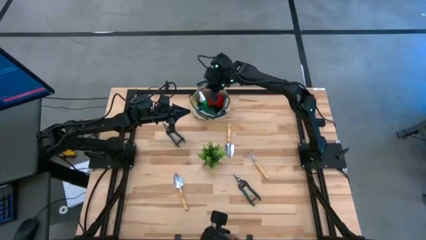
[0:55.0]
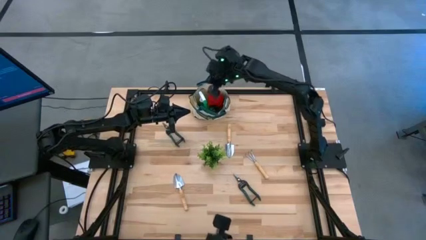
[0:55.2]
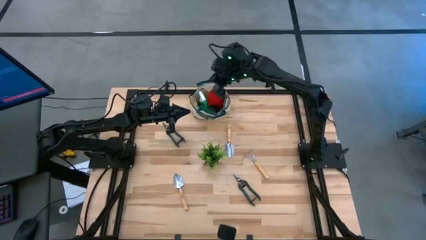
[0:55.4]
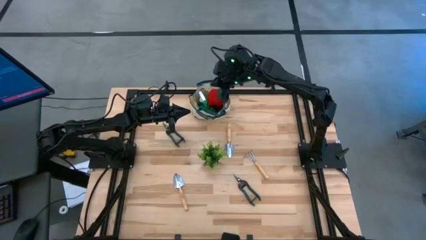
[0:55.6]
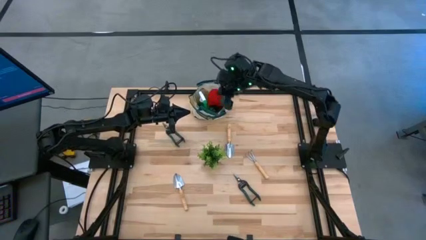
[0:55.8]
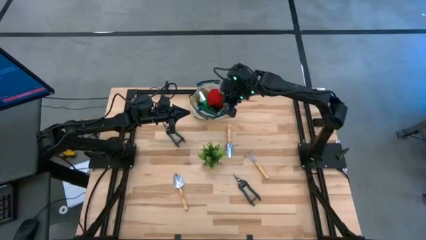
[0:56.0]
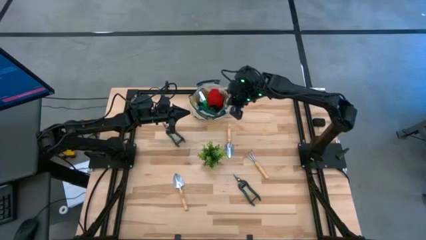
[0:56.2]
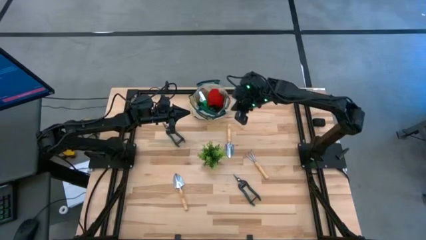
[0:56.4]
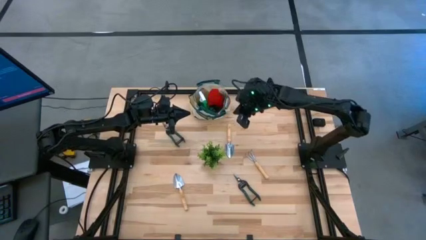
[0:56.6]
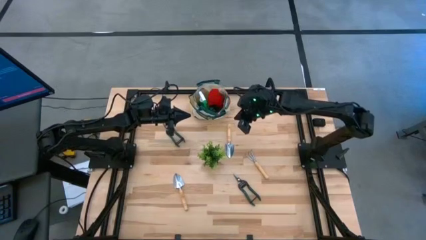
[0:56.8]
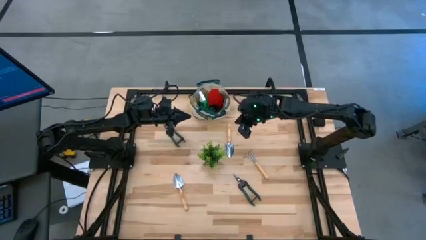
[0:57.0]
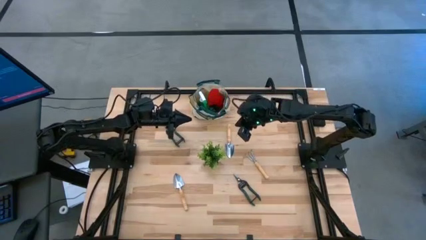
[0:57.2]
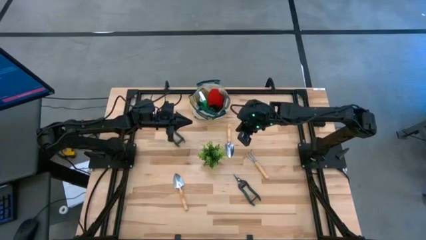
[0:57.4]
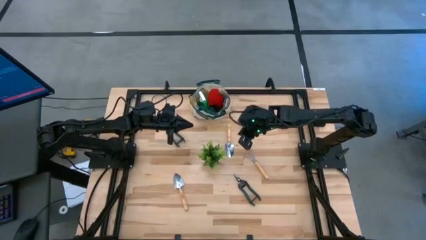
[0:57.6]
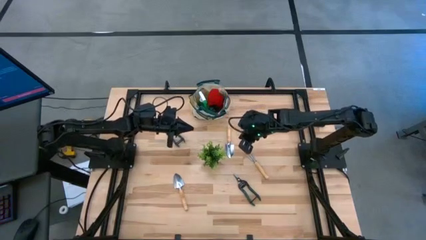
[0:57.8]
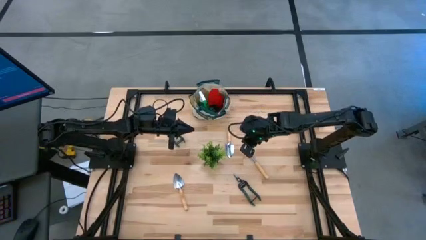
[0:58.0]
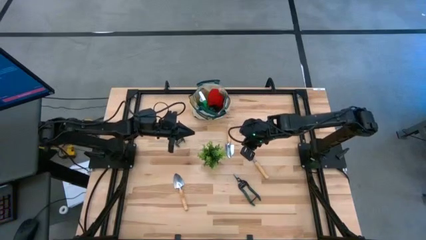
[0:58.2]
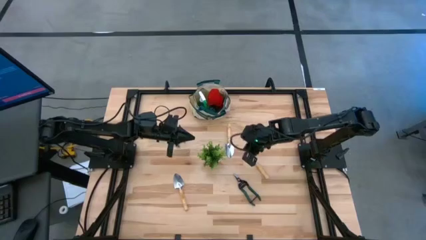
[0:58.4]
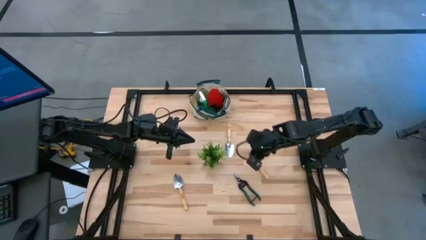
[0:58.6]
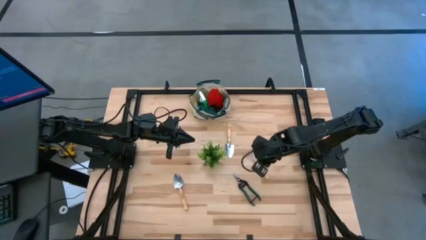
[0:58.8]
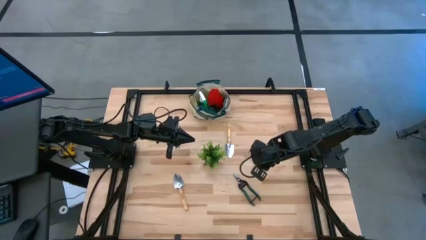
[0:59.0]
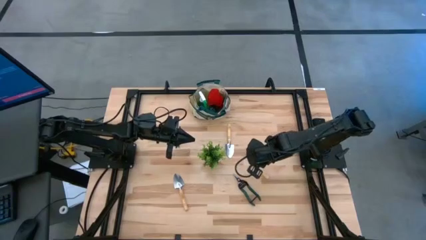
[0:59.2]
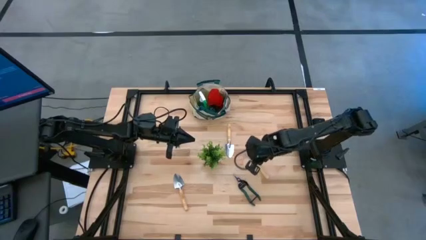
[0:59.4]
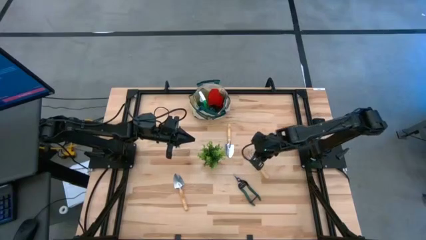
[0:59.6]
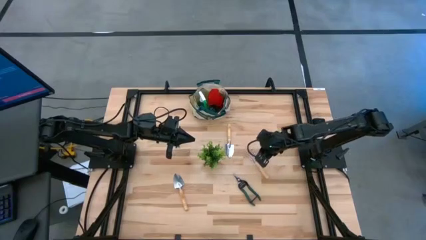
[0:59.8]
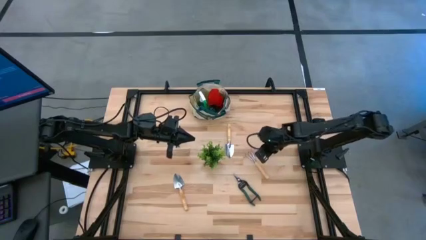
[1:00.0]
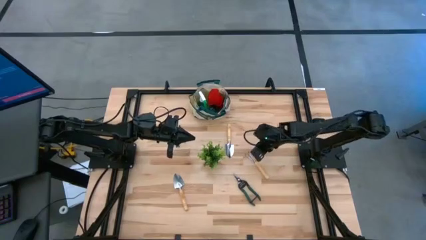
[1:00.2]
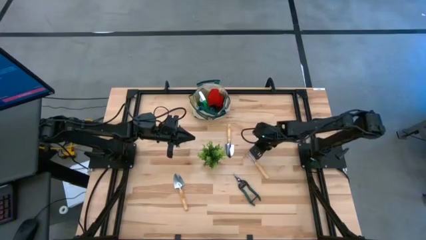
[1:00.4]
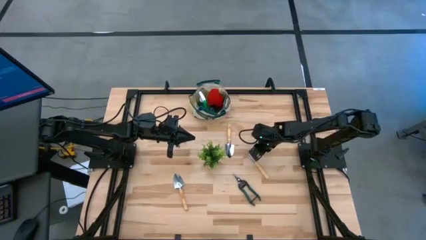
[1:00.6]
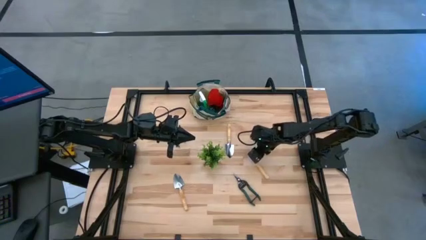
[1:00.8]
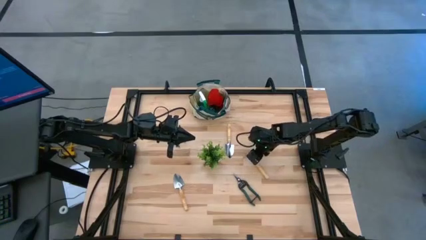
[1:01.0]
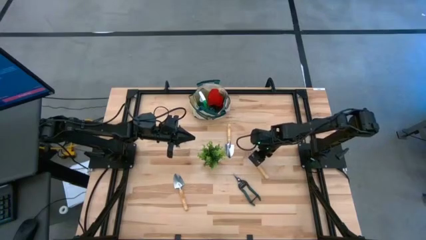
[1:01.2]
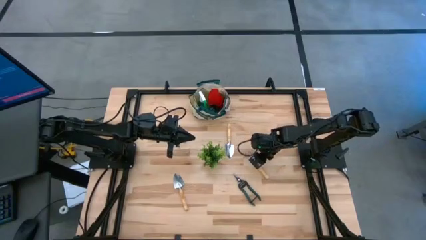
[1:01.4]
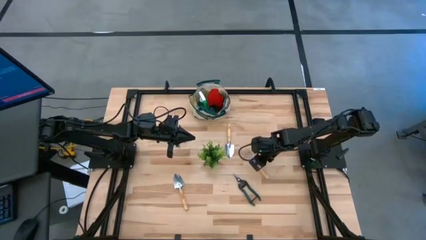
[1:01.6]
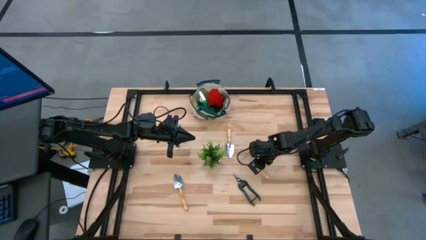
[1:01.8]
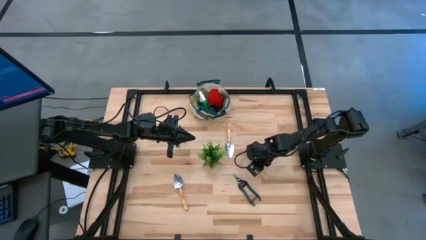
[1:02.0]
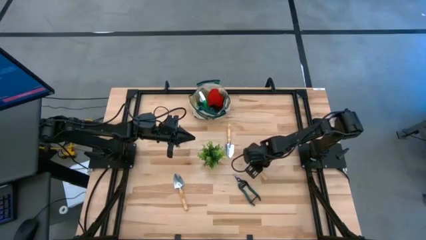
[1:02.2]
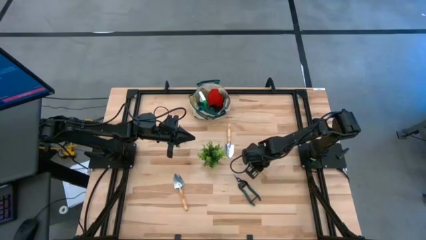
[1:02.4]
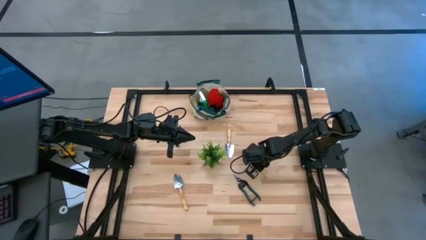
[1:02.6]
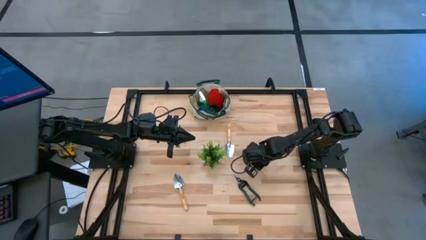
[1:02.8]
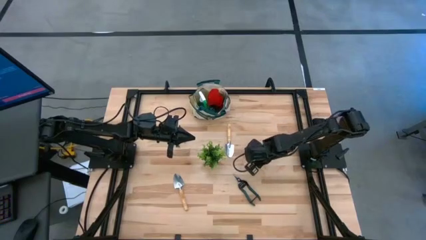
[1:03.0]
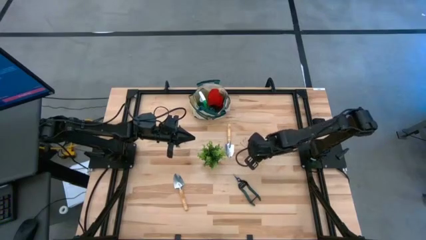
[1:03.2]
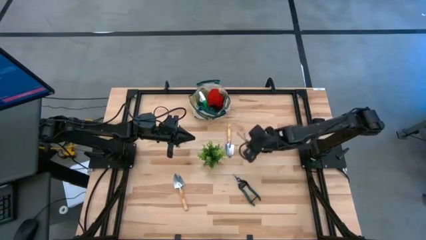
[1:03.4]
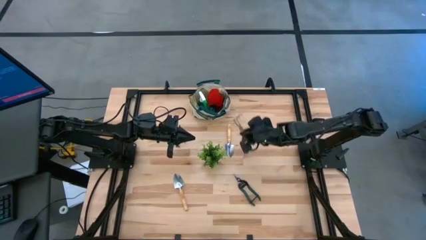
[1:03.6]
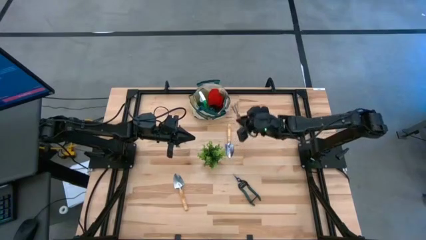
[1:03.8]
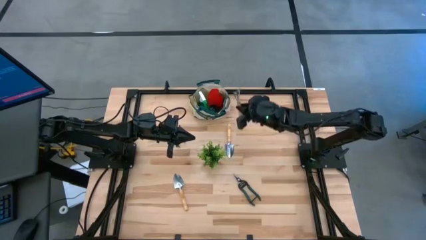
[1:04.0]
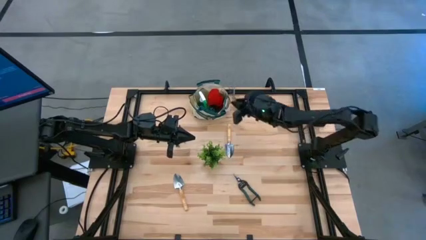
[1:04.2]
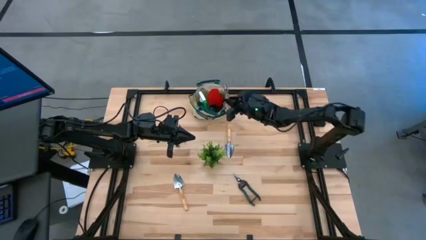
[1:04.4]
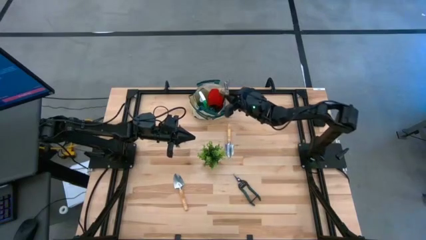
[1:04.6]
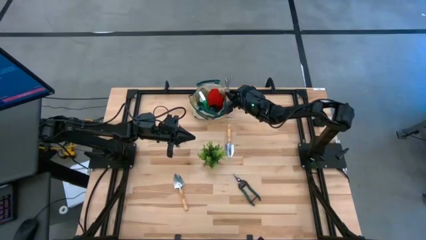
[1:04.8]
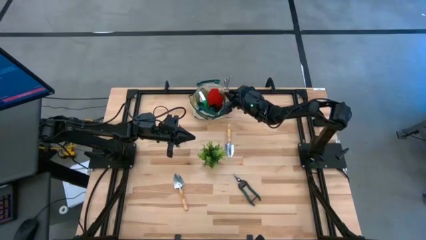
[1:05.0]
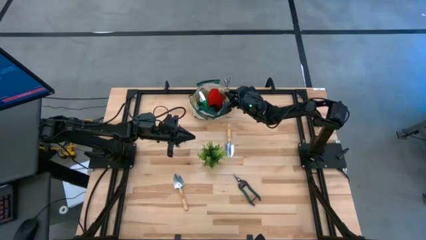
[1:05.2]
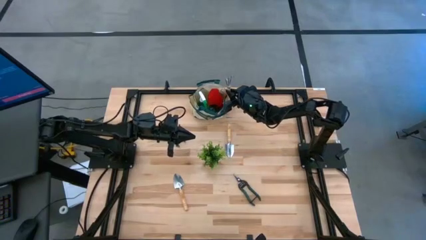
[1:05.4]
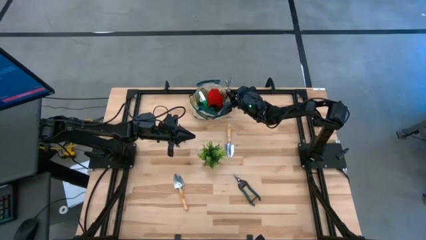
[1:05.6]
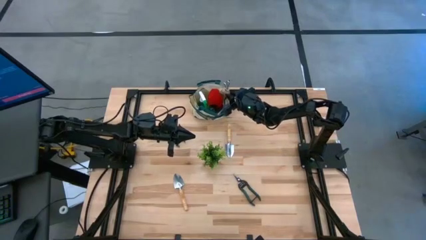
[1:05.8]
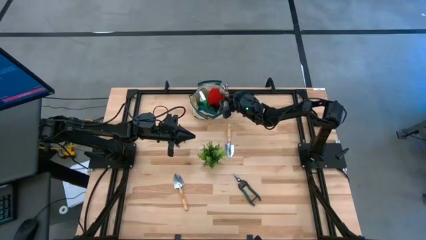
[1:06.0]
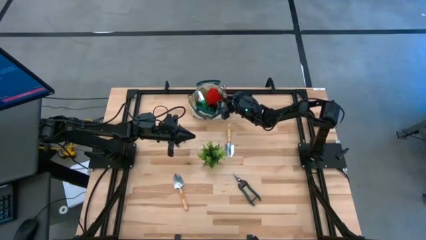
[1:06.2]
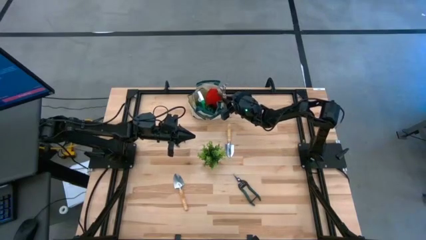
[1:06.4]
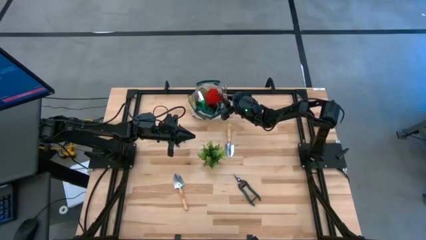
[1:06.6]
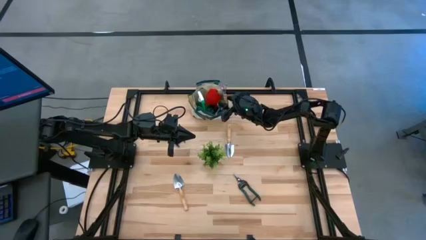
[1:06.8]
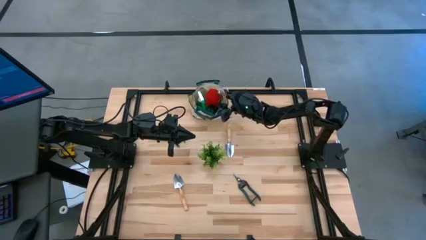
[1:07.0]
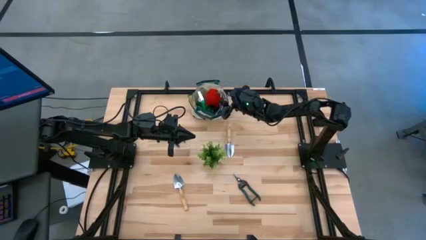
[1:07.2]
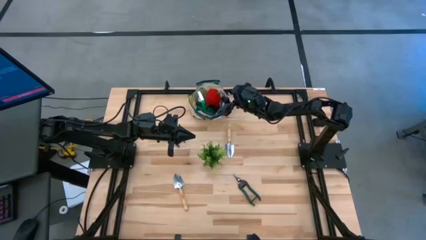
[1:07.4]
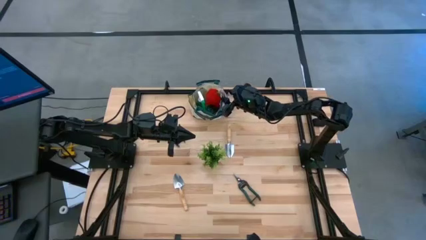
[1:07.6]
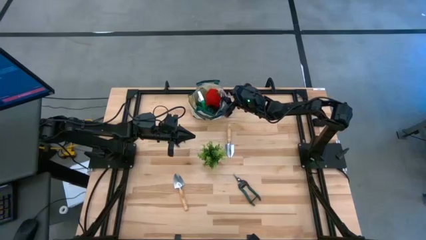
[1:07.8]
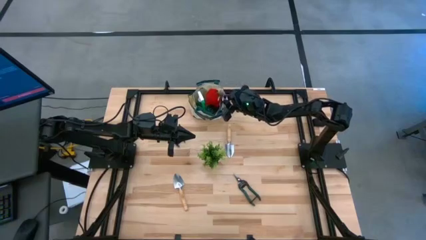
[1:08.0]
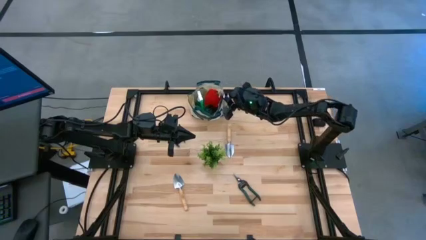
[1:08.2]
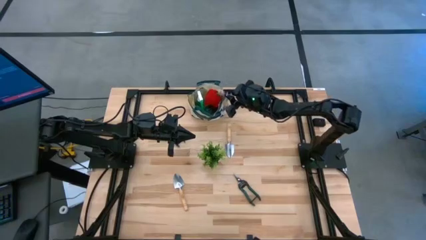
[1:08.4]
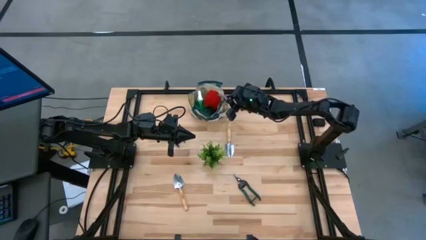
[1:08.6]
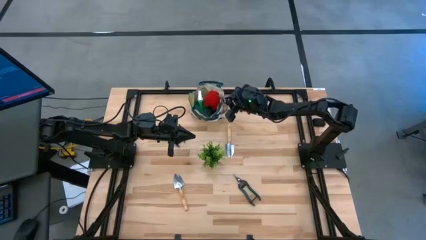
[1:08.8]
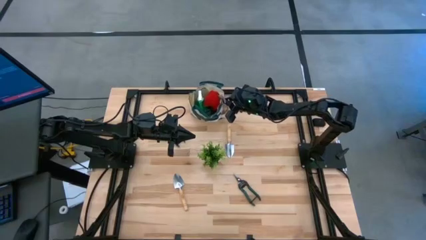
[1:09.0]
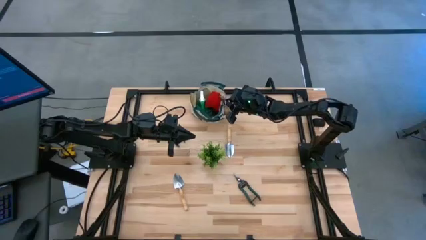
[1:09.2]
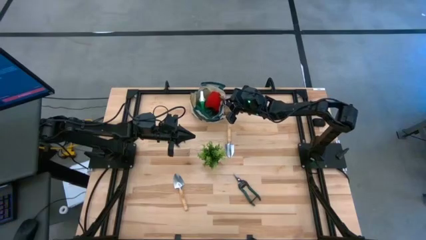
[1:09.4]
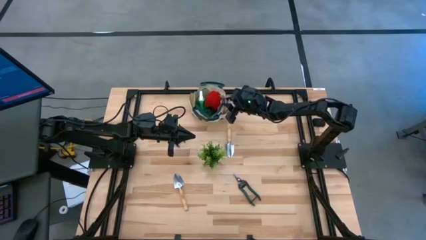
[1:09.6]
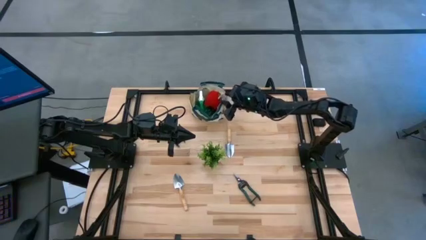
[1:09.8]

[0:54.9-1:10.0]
Task: Pick & Place Garden tools in Gardening bag
Put the brown hand rake into the brown gardening bag
